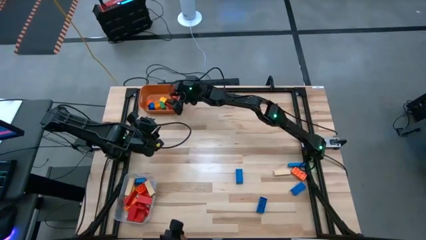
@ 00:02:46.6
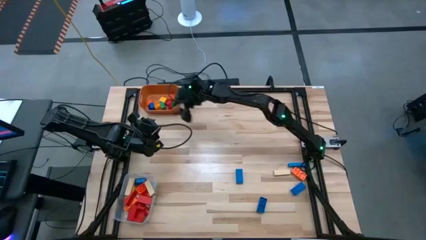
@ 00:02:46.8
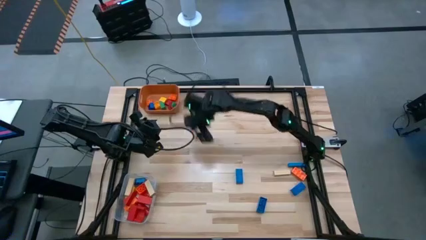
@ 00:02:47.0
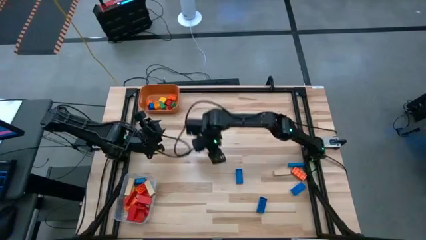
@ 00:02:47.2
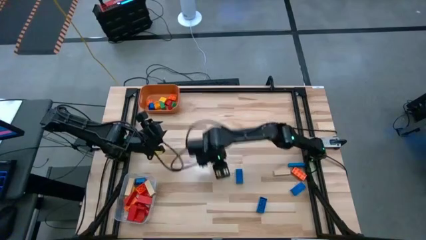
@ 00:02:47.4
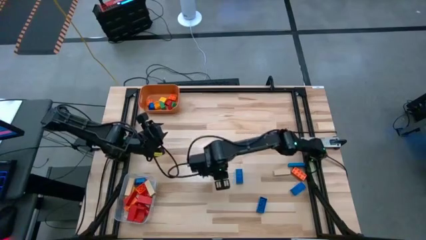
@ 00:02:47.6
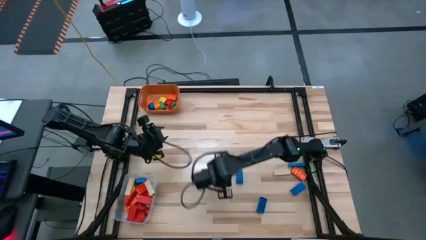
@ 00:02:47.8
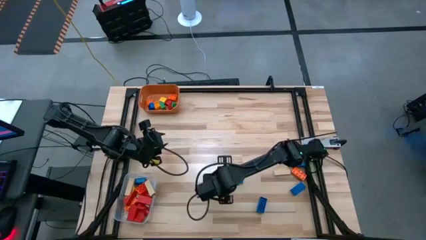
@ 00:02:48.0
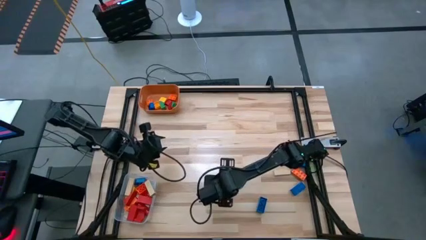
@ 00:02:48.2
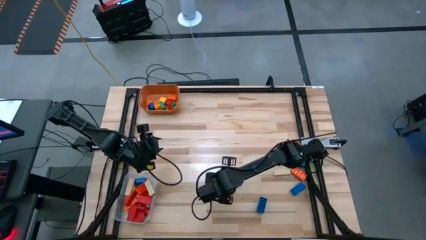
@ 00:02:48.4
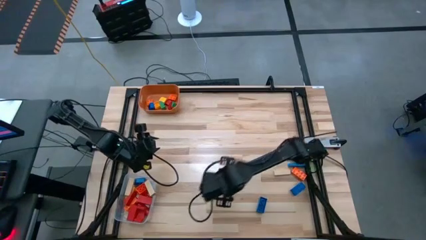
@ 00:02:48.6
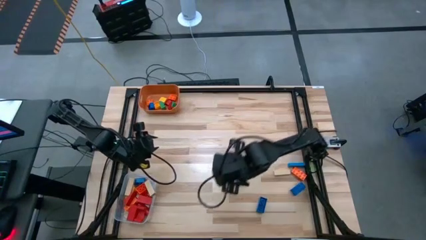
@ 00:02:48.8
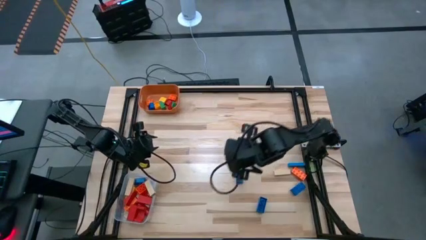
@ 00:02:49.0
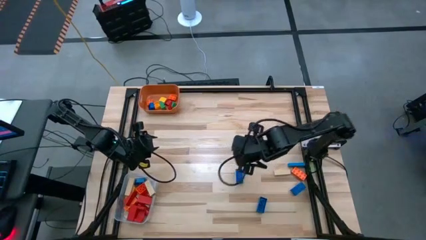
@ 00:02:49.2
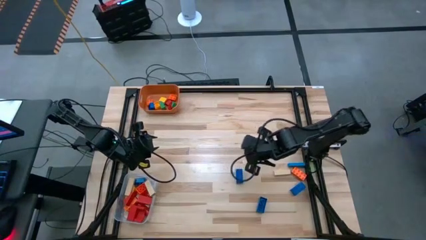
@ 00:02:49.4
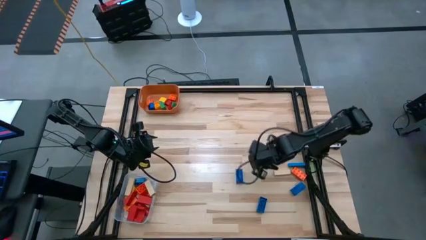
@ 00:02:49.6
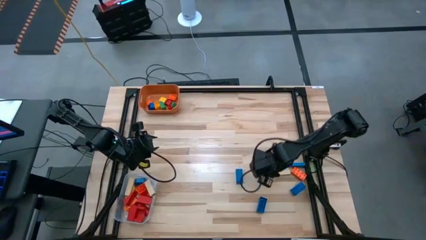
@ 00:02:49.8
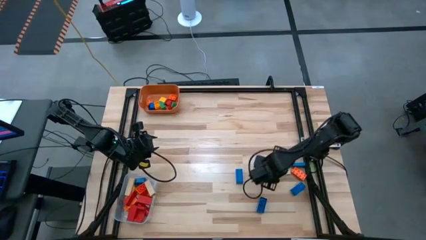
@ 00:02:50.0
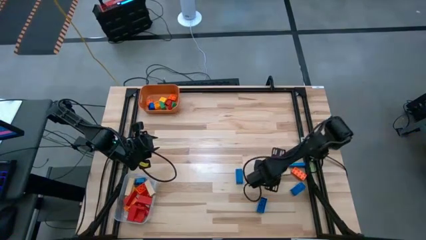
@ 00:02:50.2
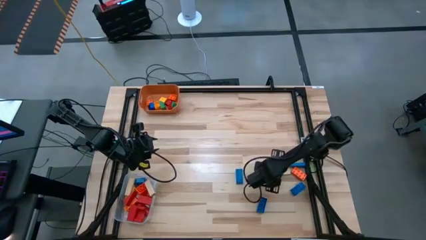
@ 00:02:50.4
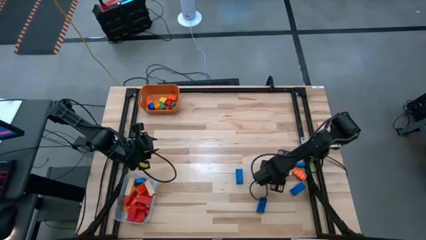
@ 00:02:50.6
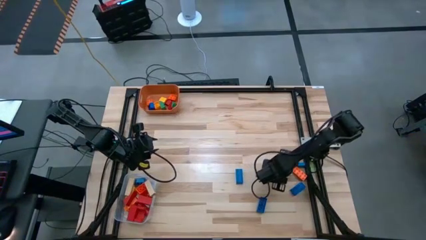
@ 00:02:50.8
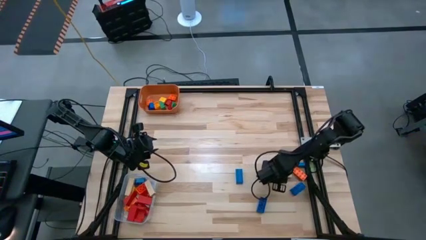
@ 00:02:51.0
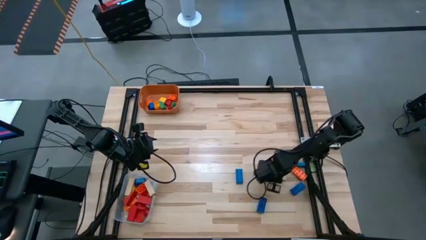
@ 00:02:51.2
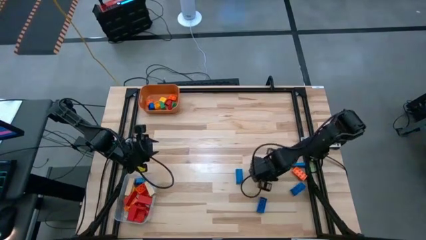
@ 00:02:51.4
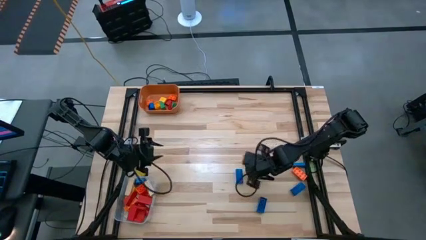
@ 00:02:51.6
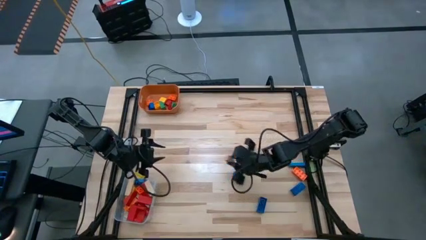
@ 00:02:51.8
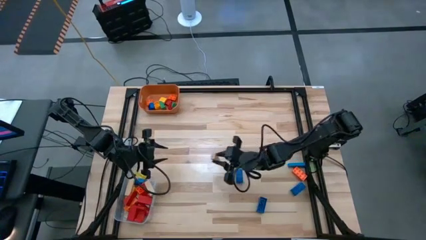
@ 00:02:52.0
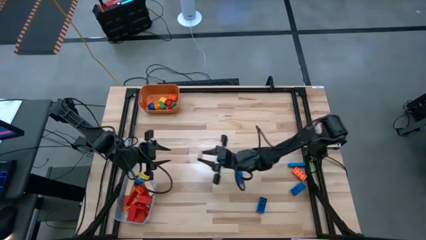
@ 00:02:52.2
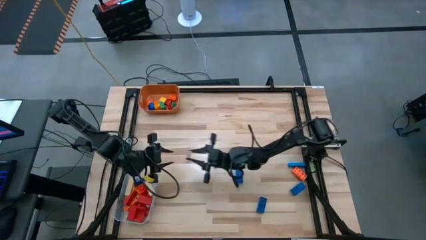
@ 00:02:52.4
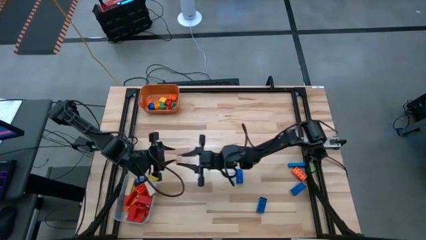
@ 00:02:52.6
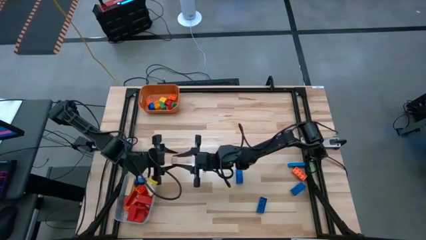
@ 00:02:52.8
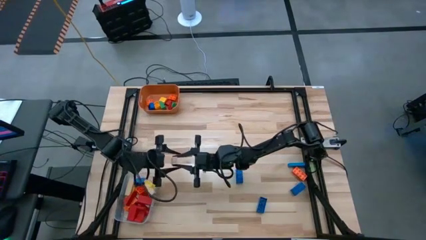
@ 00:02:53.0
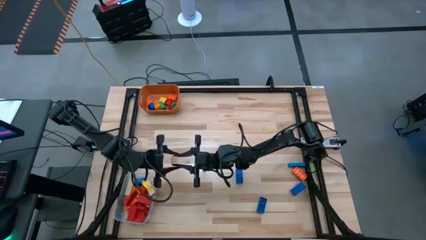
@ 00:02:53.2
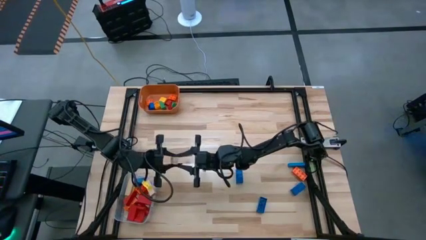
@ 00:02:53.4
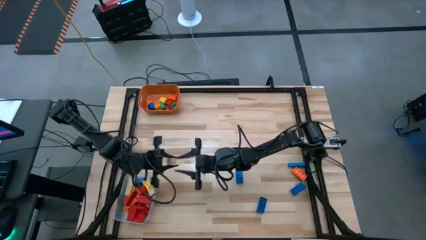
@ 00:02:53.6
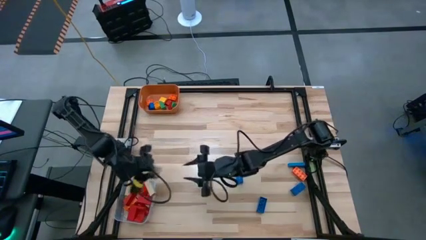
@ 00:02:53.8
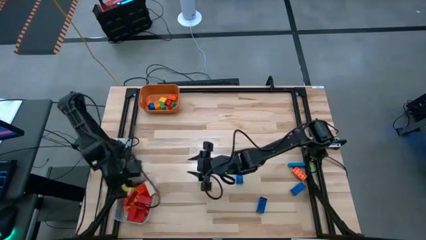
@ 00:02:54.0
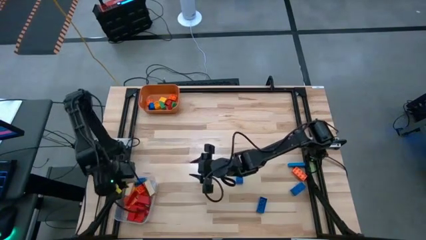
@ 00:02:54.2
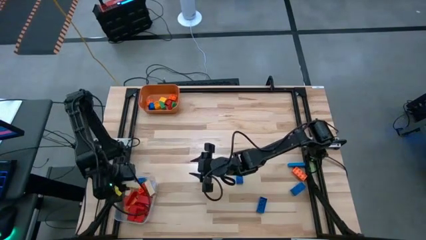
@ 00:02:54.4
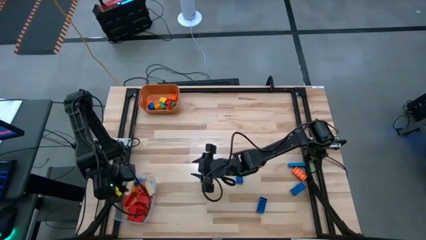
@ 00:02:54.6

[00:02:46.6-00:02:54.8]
Task: Sort blocks by size
Put the large brown block into the transparent bin

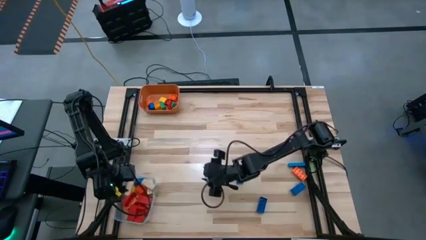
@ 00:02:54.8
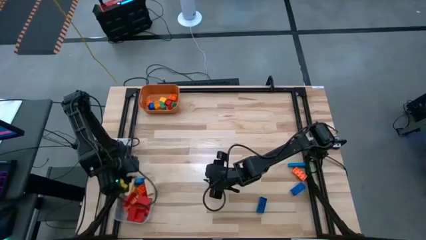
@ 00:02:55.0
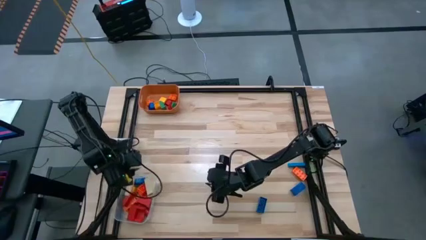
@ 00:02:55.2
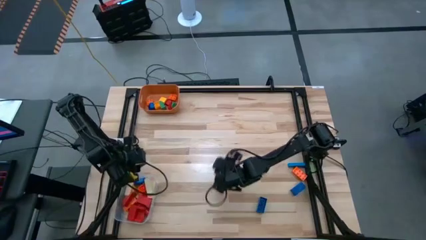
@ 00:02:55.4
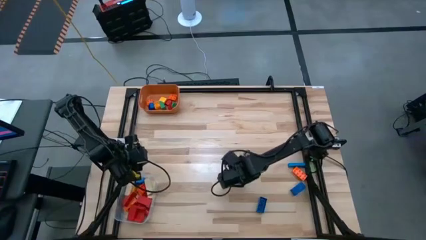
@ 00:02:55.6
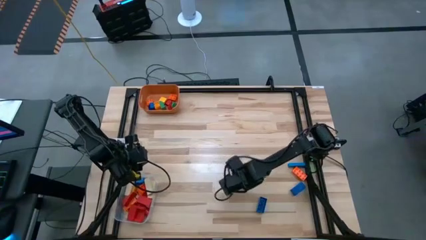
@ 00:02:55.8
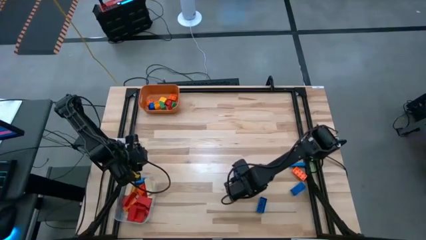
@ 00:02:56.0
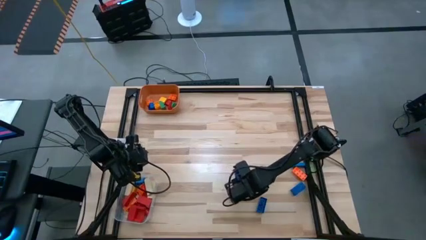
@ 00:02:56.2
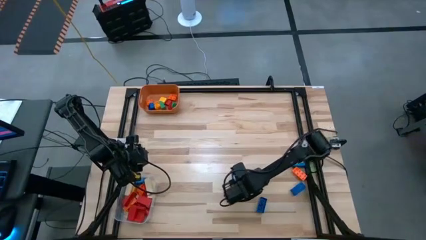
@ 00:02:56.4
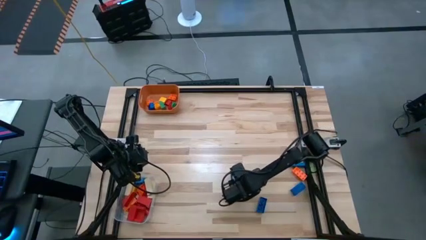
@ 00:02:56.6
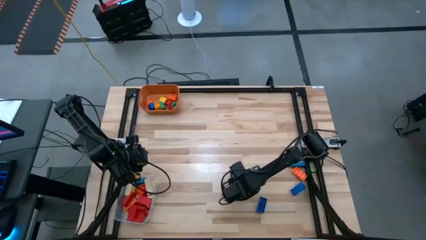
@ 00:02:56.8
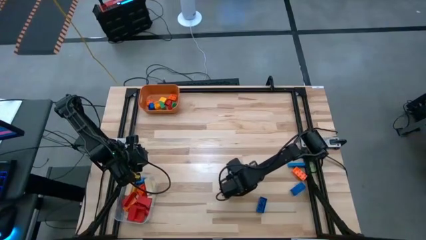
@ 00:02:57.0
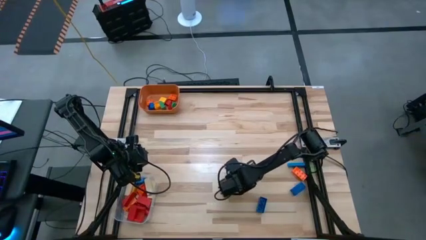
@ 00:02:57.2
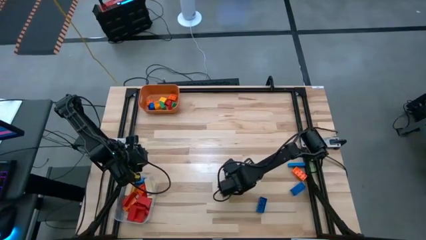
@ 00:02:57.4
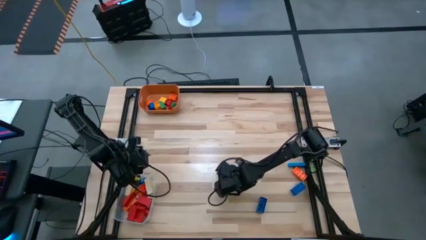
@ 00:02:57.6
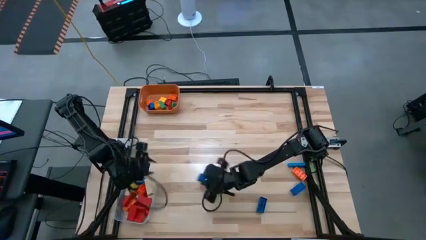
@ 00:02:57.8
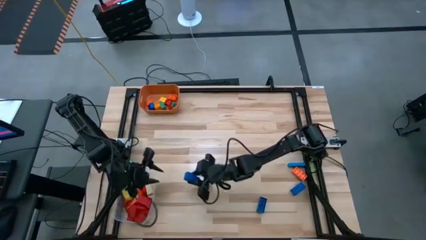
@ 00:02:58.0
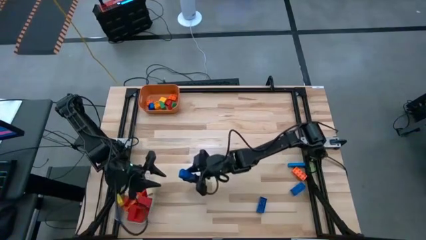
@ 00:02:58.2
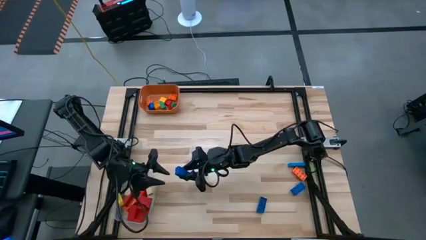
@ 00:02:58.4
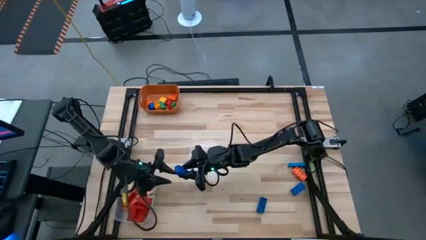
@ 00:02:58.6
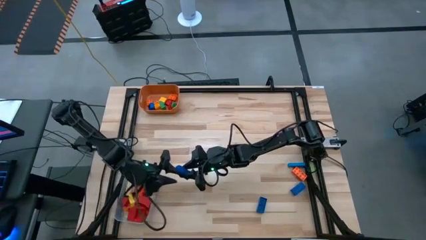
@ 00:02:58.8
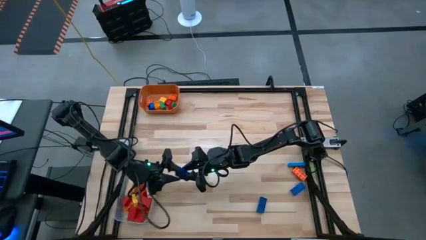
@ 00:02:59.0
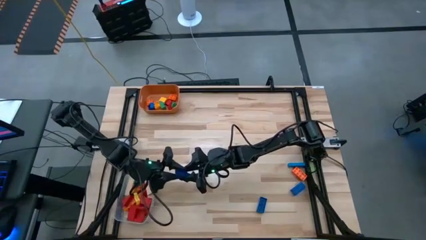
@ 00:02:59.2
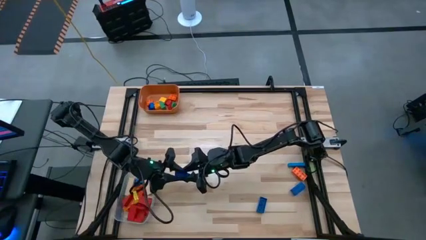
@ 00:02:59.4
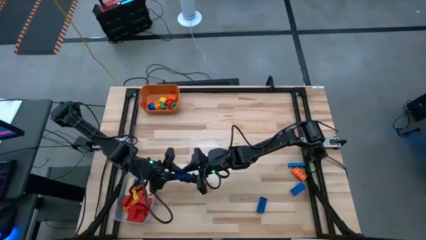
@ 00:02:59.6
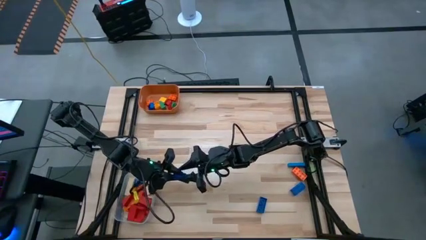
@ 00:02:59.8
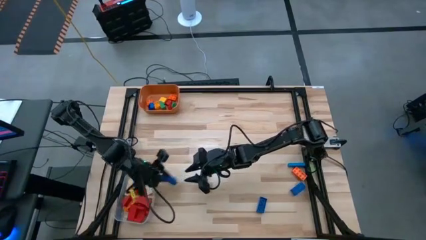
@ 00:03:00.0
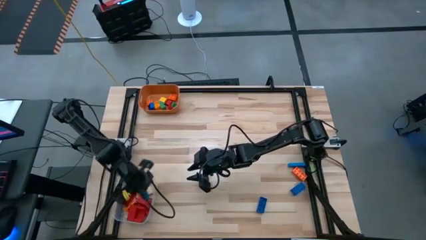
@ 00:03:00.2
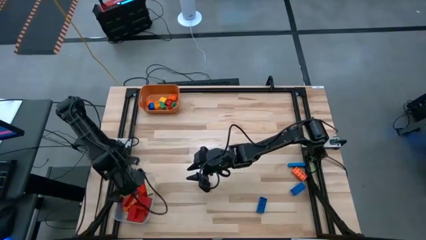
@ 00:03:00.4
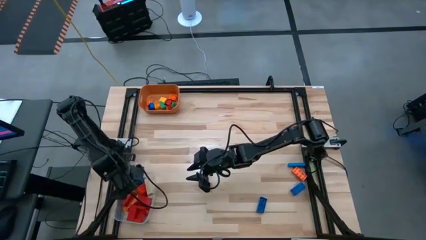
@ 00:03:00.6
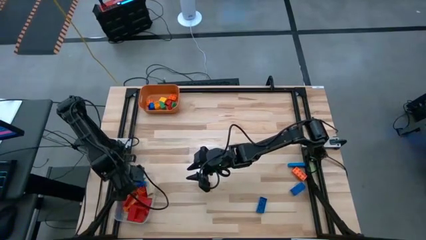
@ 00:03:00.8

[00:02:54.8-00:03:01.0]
Put the large blue game piece into the transparent bin

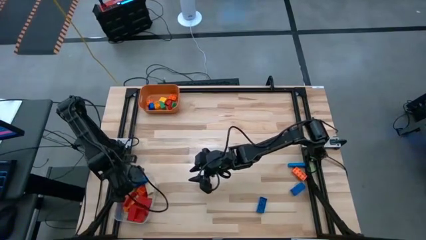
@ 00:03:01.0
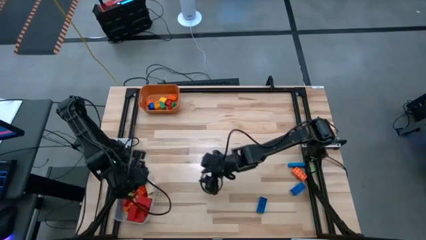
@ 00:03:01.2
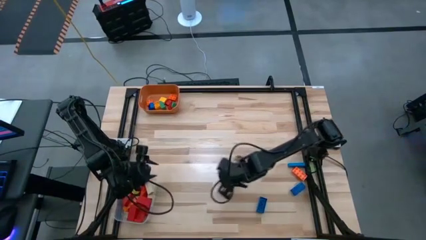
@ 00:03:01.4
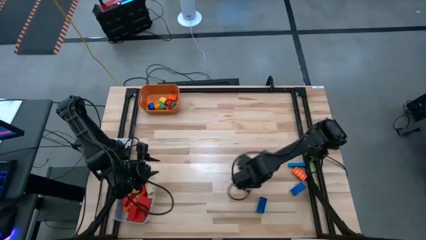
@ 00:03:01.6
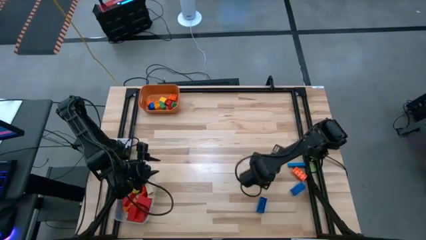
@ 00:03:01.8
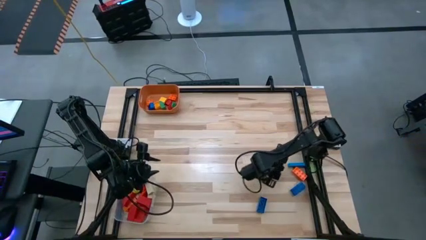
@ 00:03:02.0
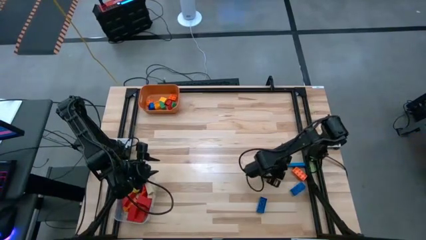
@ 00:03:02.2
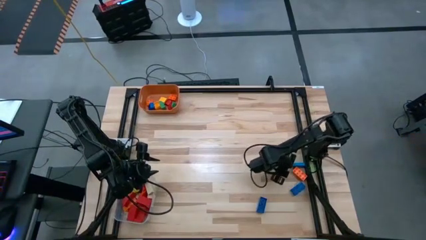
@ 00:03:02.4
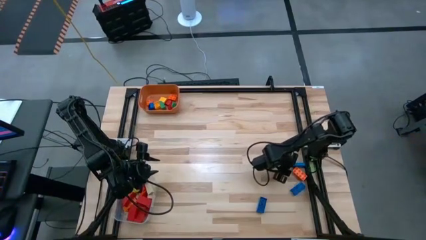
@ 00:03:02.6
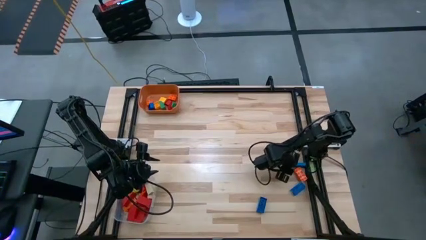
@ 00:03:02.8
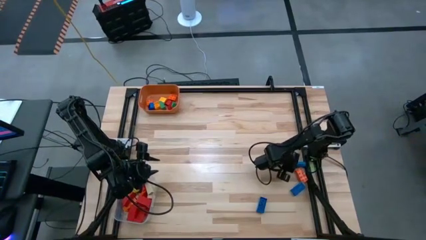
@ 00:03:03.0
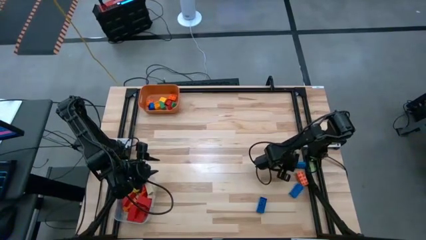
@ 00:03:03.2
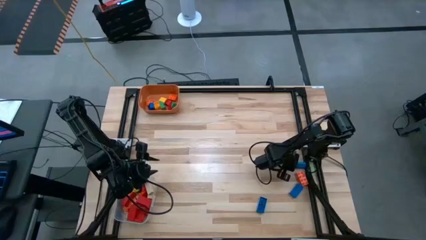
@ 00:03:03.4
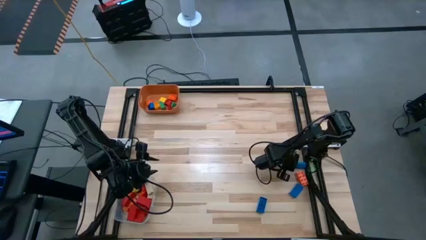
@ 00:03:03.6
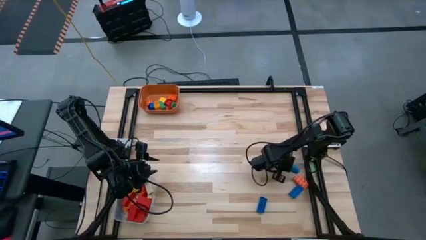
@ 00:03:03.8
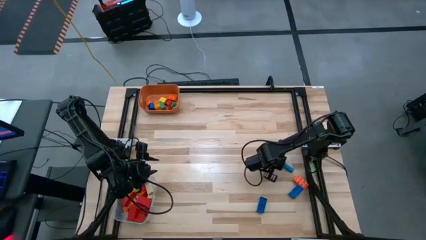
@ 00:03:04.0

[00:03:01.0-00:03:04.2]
Put the large blue block into the transparent bin
